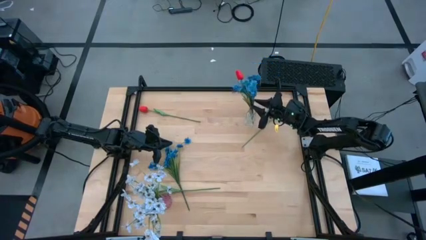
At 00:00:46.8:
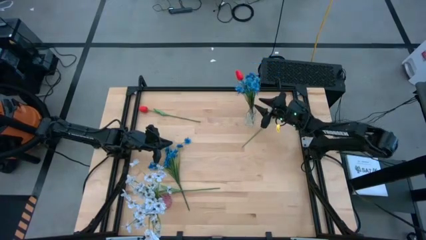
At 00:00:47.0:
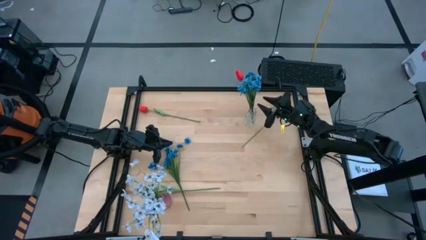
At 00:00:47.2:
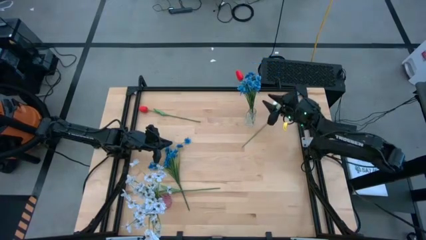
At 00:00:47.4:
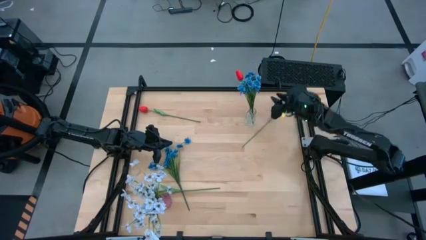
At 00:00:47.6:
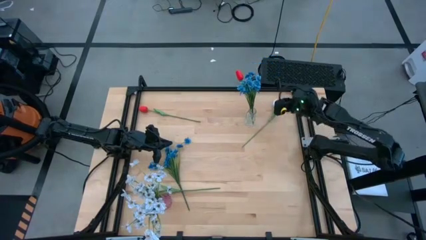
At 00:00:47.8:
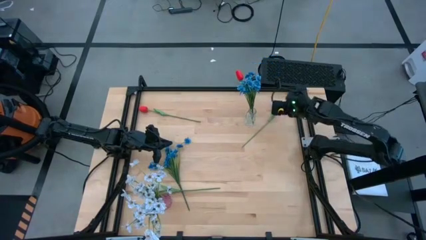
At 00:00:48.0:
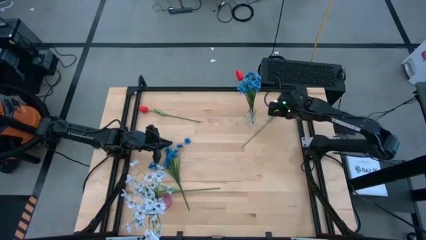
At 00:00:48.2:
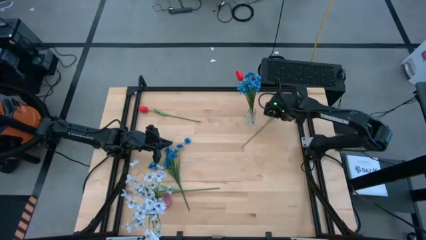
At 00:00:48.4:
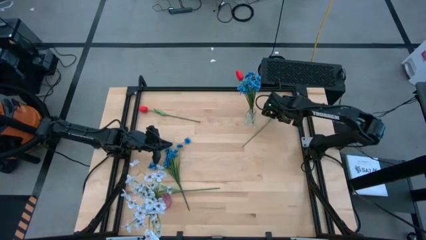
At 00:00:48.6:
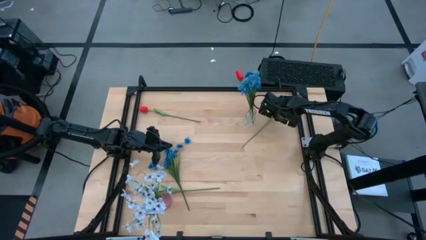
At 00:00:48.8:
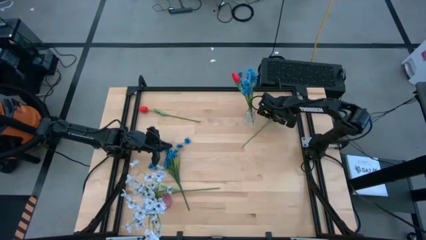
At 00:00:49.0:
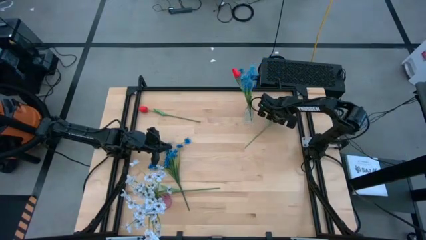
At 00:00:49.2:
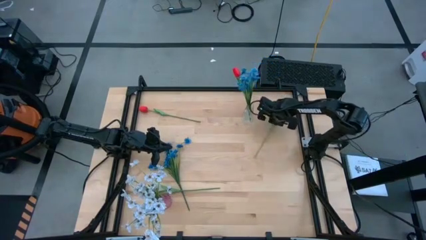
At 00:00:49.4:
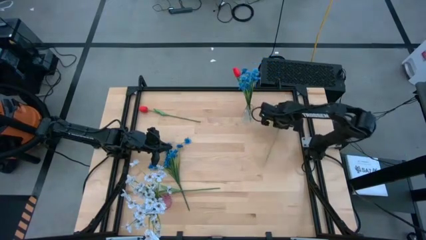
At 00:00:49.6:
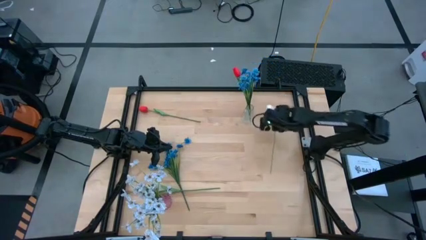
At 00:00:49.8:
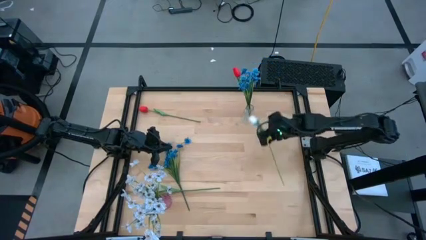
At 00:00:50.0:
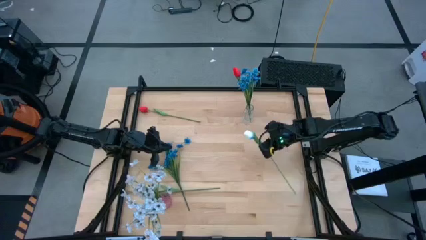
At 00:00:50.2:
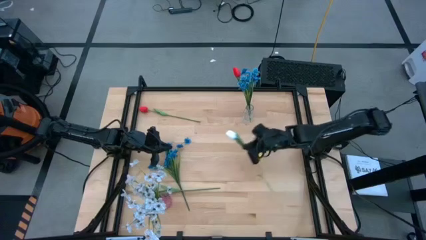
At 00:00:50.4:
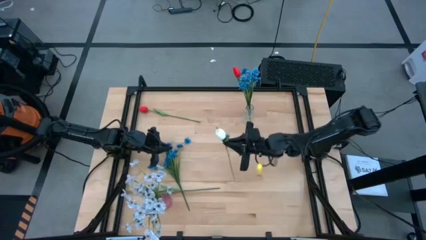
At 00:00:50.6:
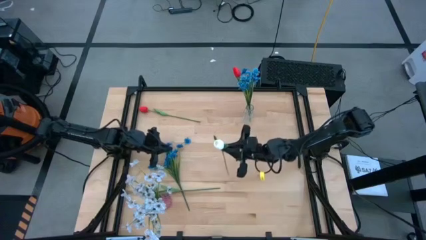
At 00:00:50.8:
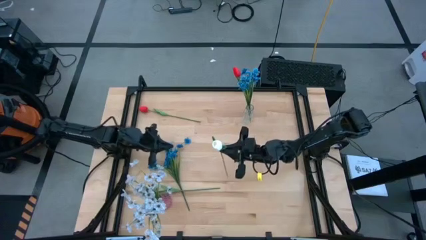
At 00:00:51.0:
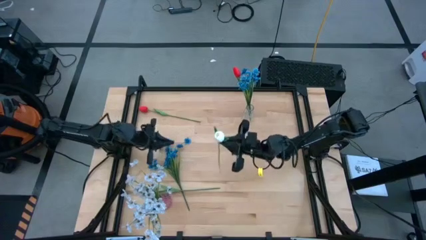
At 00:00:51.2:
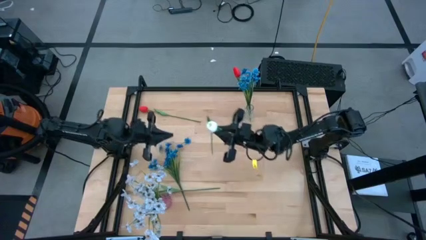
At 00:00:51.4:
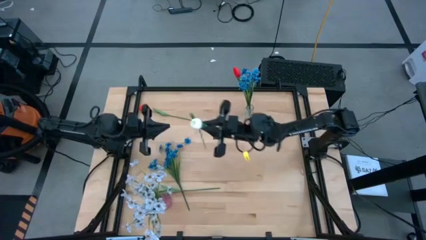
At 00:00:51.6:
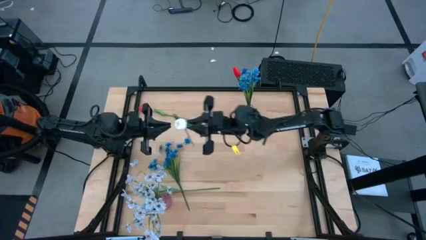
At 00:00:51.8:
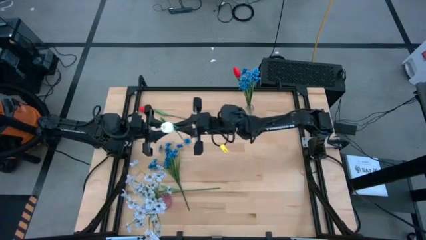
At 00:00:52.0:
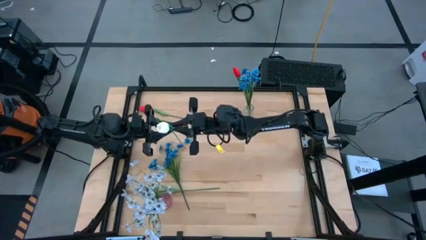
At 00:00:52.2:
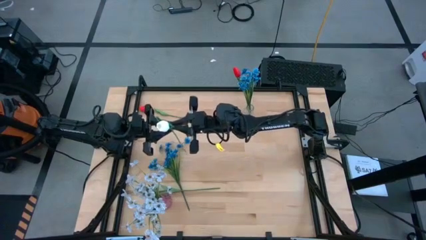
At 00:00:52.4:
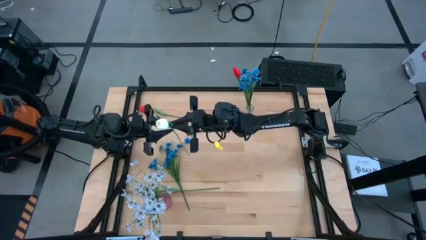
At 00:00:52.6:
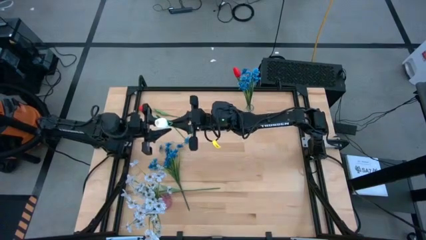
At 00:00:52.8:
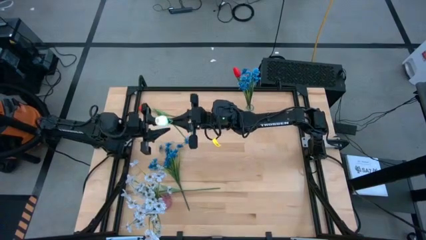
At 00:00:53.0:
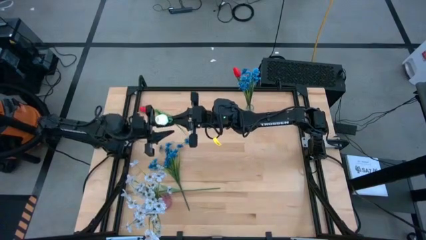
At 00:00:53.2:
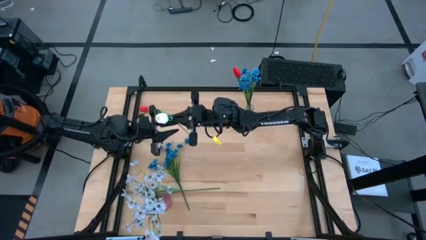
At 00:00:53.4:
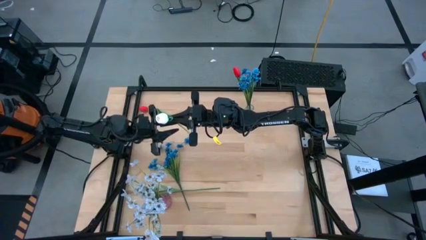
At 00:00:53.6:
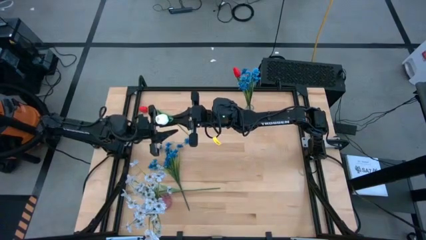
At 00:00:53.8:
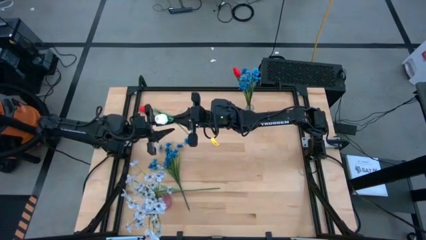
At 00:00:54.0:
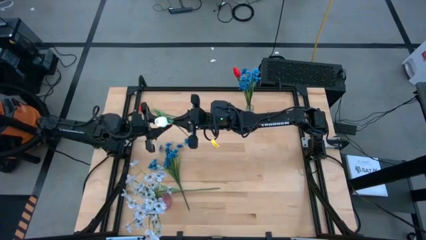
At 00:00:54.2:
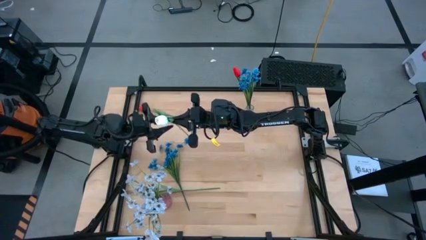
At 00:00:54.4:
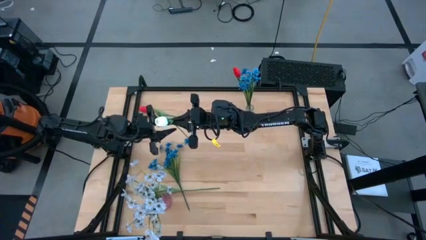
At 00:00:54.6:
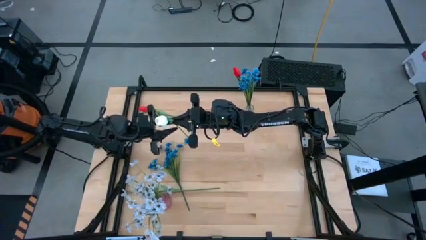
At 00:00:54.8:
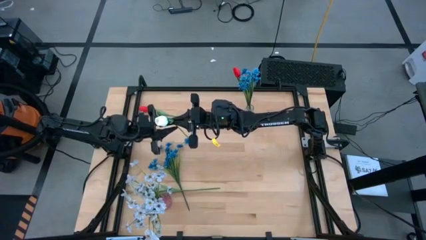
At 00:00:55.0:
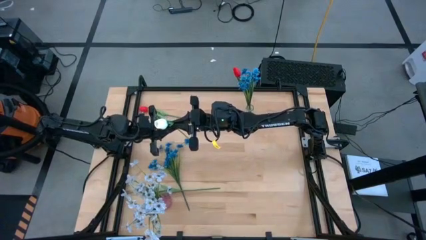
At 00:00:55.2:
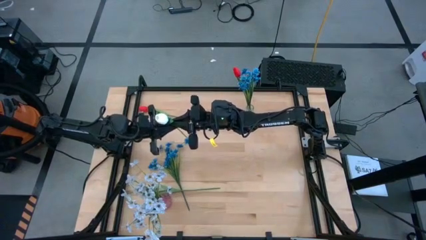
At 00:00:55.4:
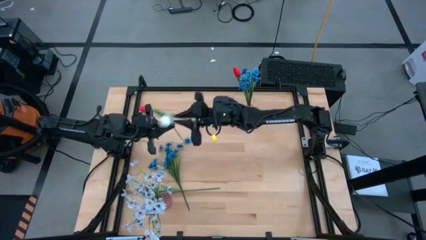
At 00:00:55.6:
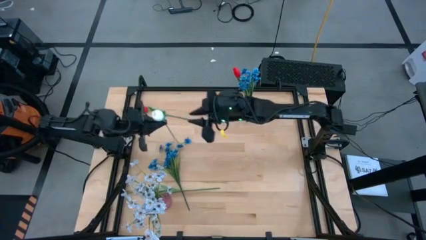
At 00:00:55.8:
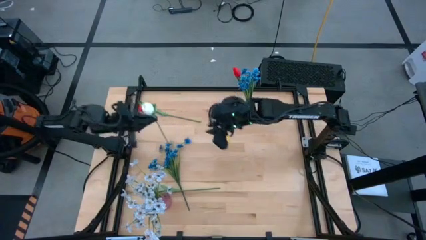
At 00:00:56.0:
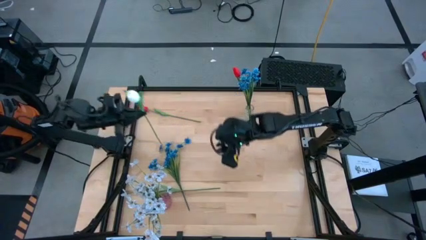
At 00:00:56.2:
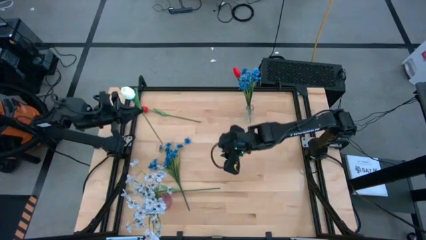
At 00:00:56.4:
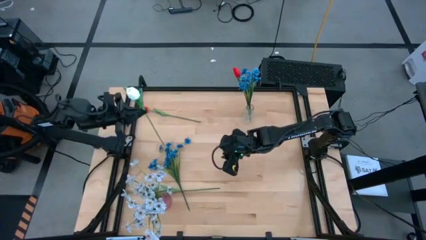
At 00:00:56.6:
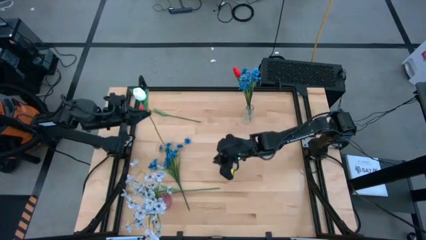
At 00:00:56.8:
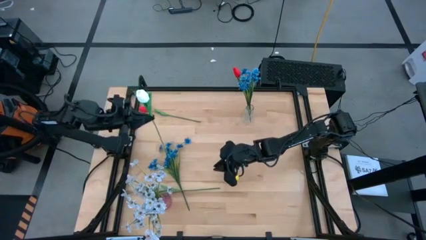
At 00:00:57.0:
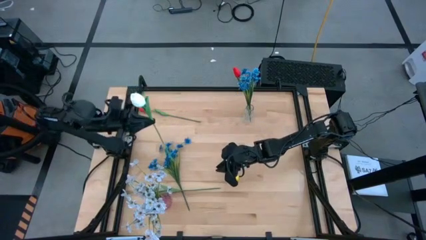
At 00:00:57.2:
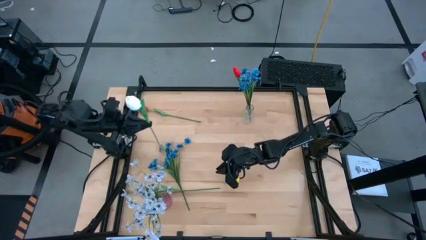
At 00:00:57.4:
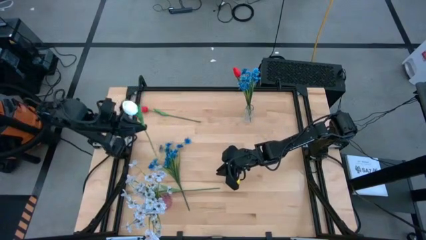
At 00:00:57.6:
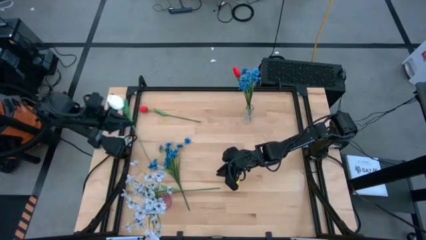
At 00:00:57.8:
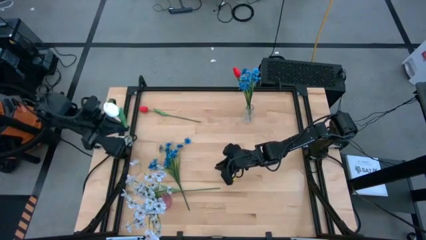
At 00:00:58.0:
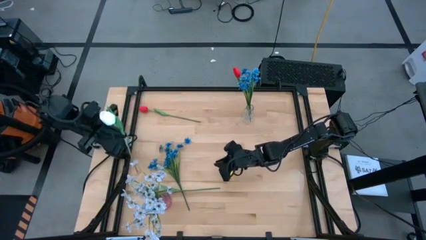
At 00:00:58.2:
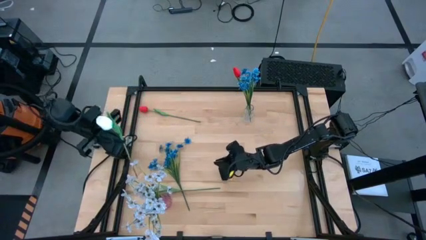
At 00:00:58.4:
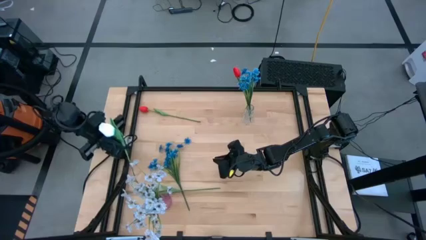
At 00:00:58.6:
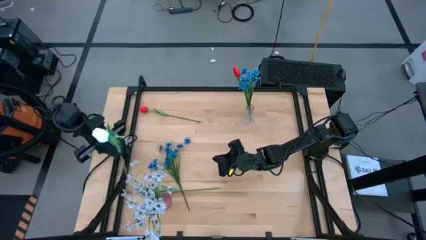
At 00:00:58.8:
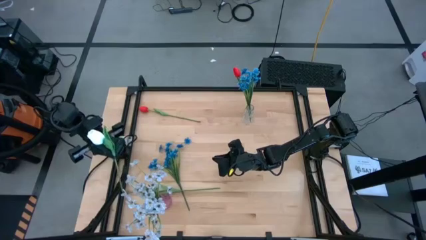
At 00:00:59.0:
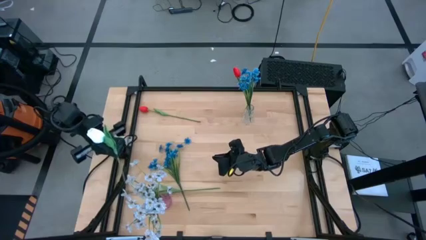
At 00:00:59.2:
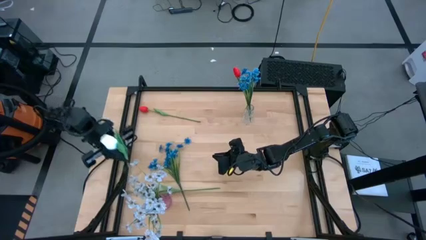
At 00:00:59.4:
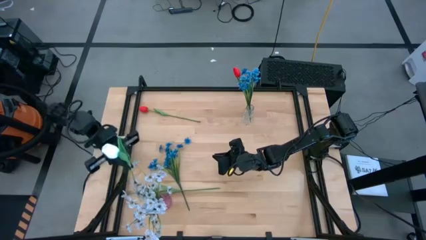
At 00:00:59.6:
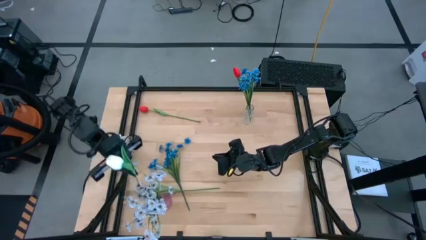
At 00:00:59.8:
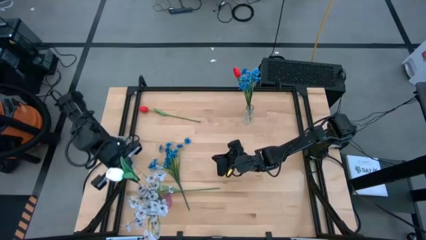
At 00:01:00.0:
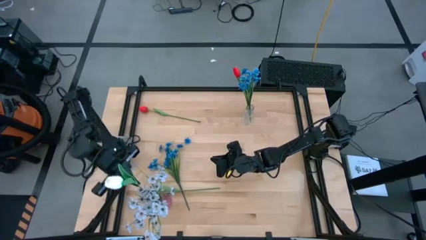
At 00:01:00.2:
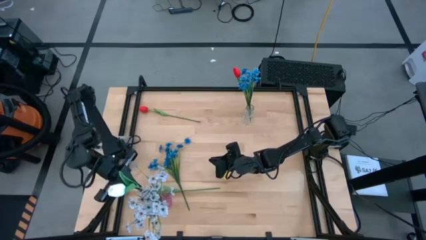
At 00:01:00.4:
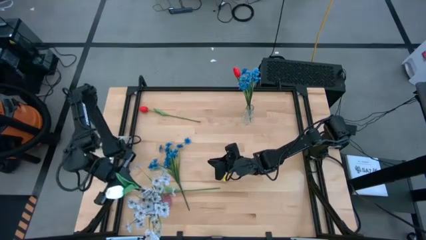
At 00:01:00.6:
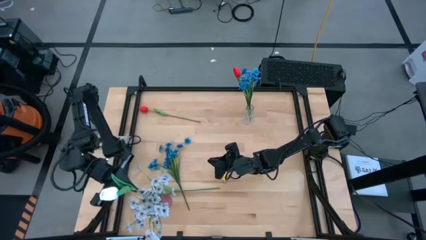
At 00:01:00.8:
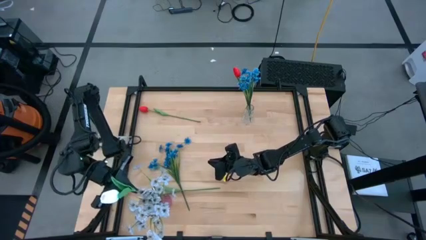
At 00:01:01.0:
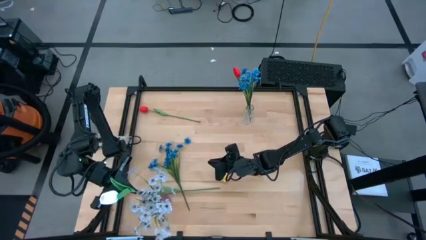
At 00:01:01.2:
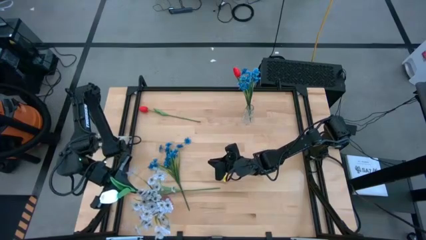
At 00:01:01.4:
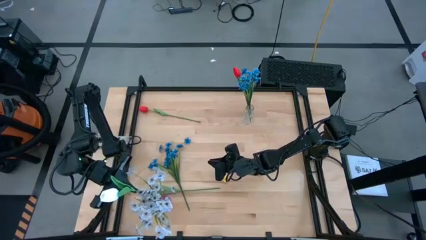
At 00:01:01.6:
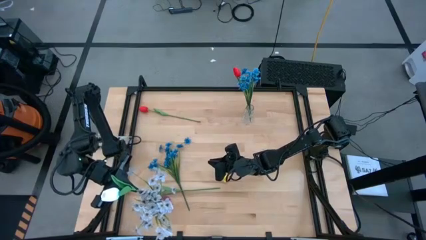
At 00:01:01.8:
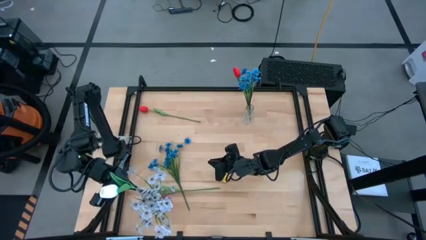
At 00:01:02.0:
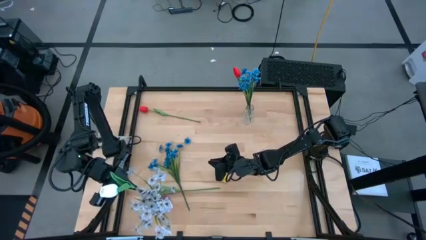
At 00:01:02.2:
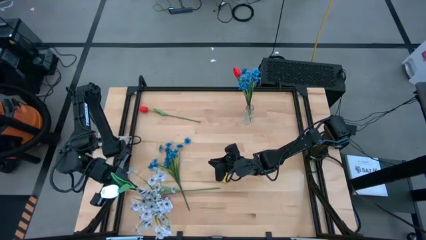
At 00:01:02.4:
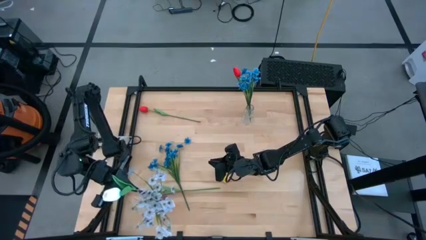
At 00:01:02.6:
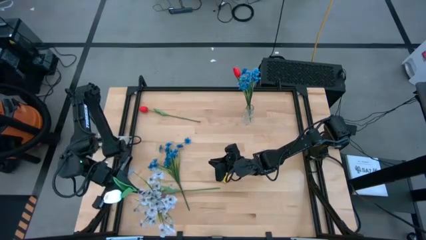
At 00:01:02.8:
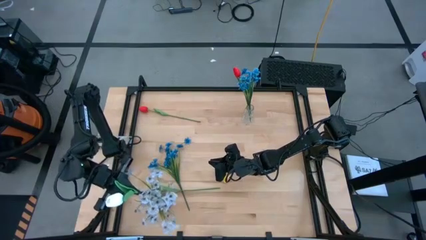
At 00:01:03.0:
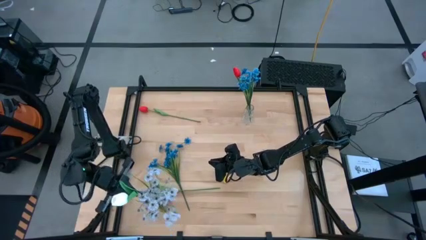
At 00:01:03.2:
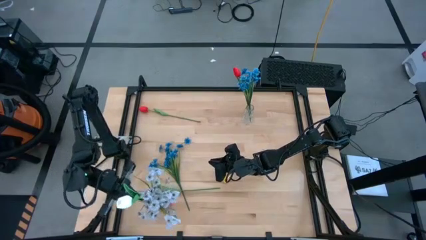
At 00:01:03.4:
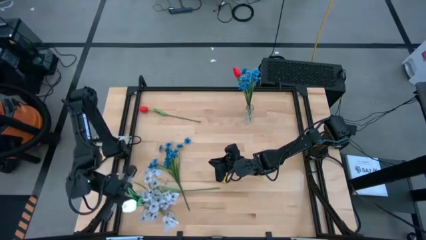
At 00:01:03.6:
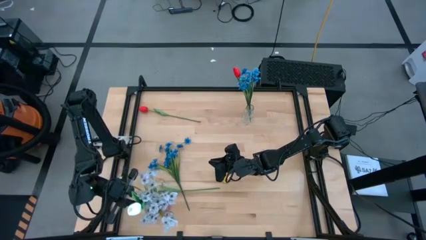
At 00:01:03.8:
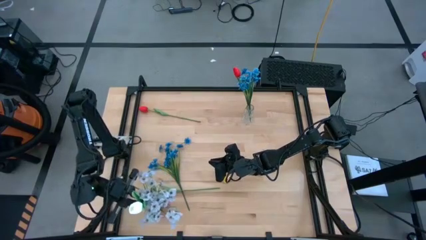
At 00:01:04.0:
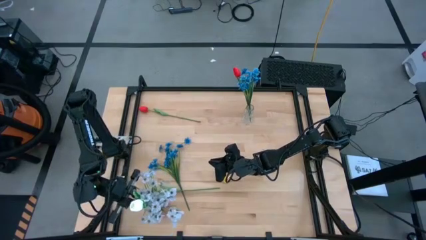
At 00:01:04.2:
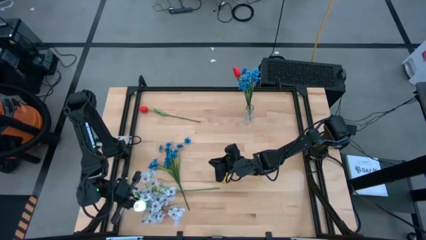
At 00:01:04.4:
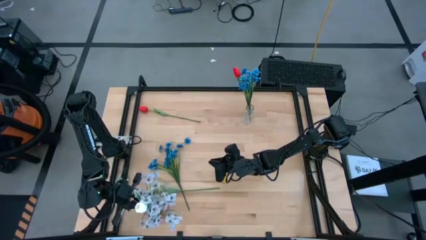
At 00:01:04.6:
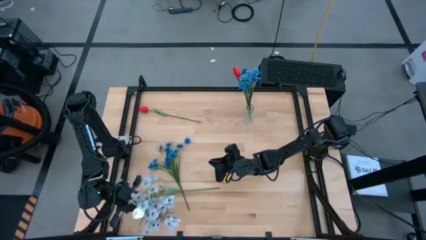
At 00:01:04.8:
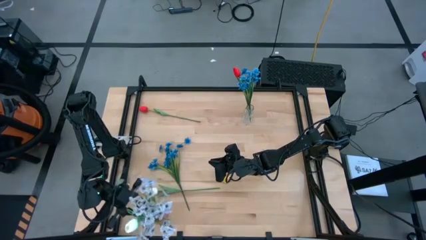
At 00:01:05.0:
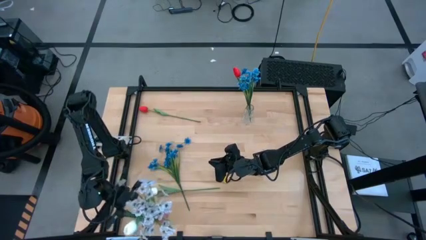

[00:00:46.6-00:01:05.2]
Task: Sort flowers into vase by color
Put the top white flowers into the pink vase
